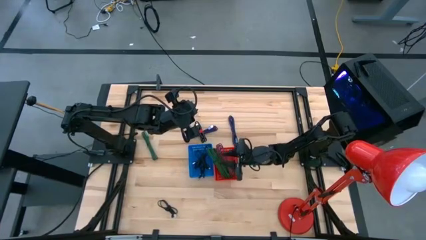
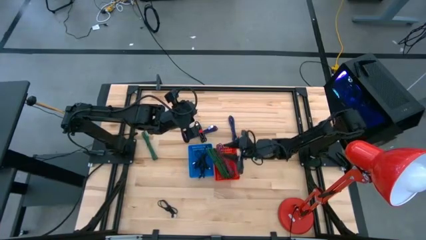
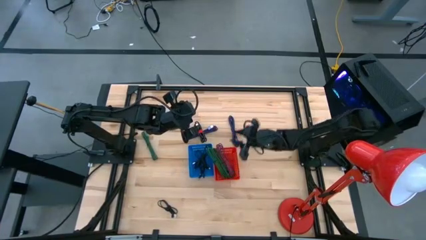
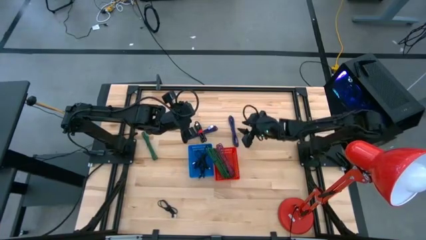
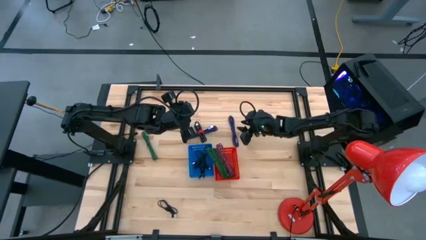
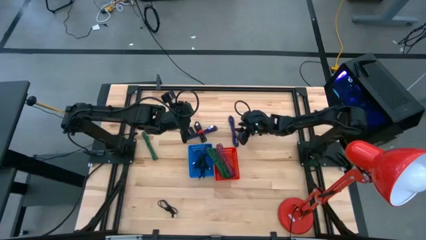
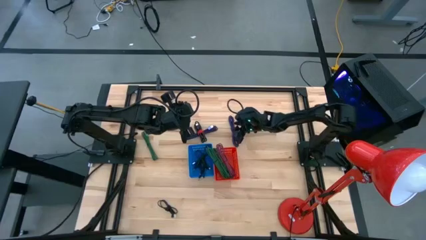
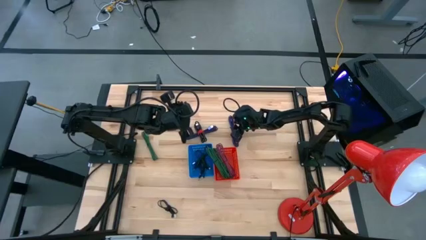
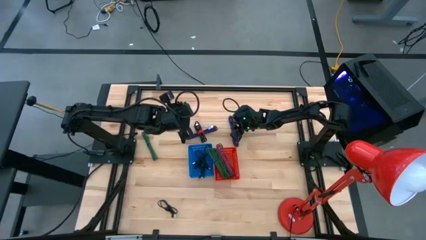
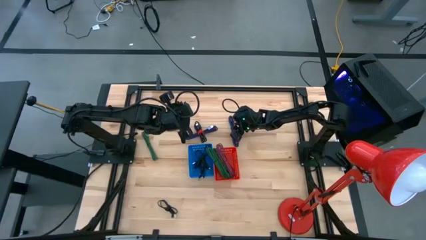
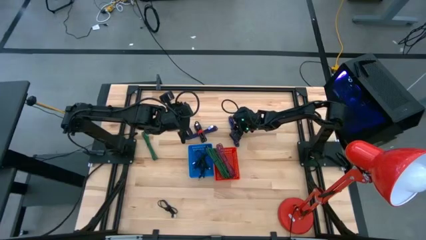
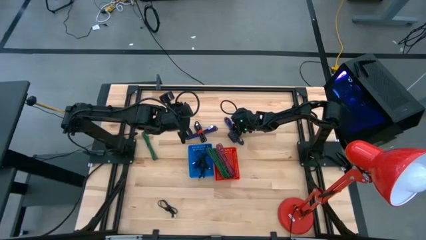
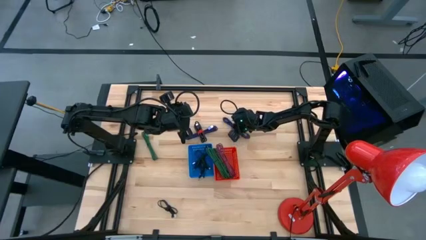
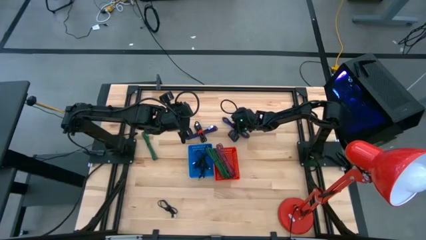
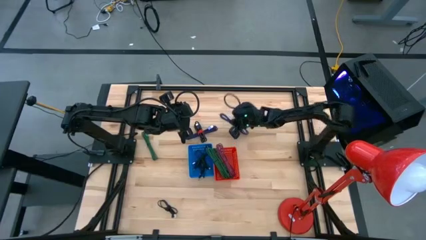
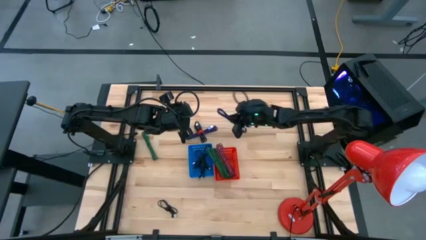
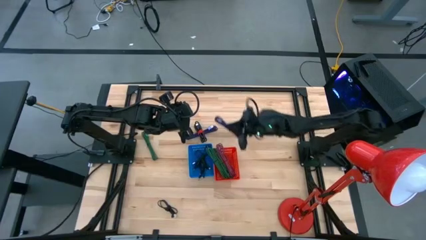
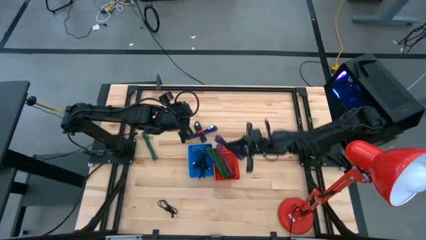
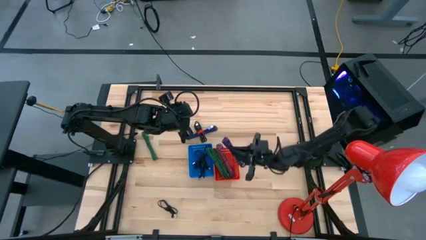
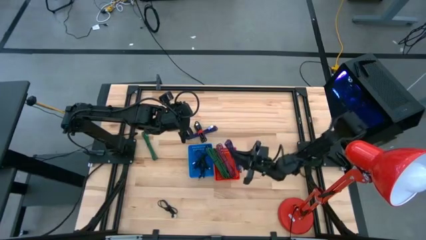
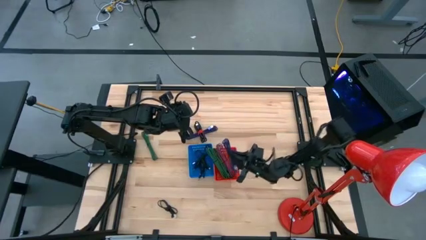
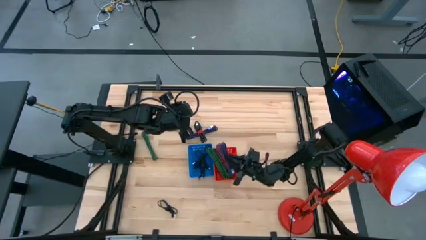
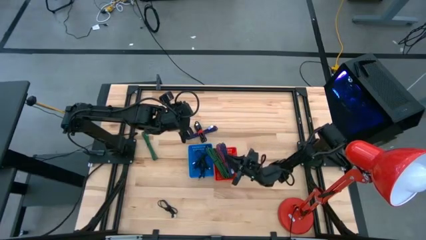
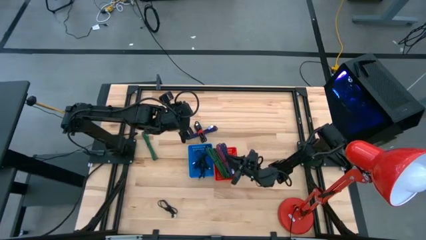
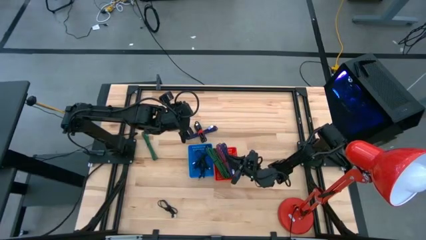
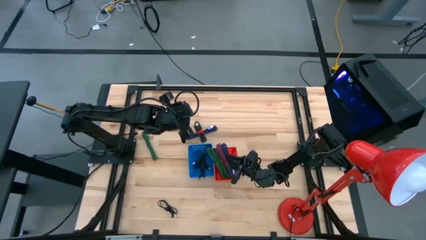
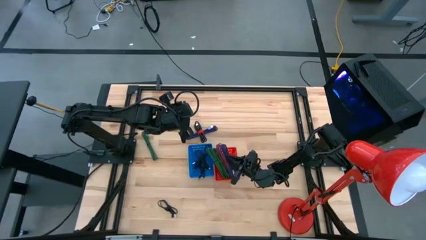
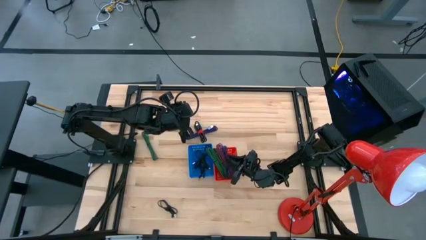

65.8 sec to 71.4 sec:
Task: Pick & Place USB Port
Put the black and blue USB cable into the red basket

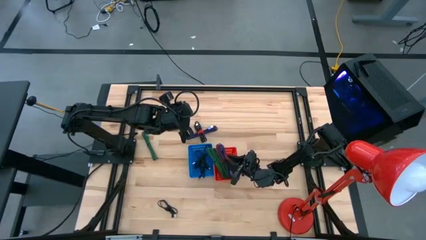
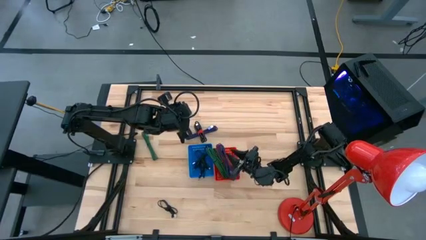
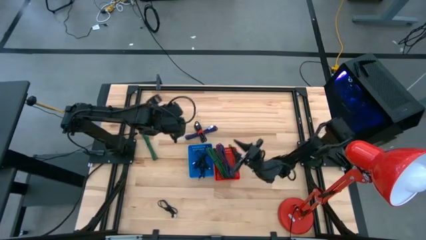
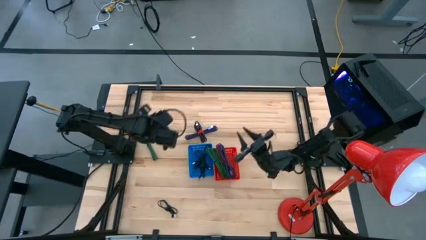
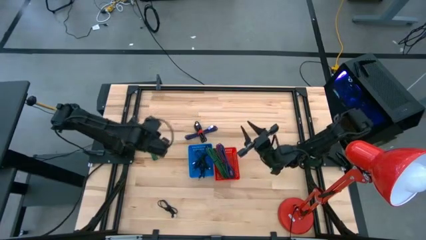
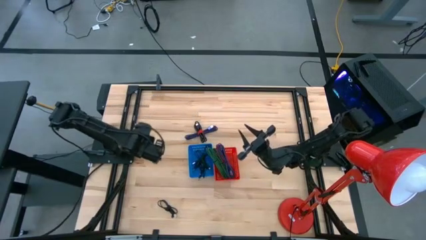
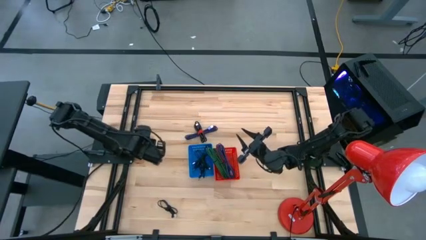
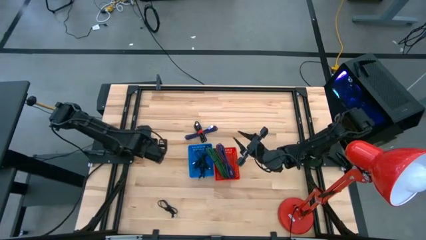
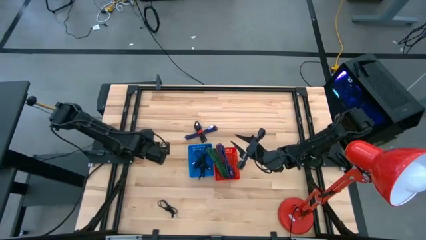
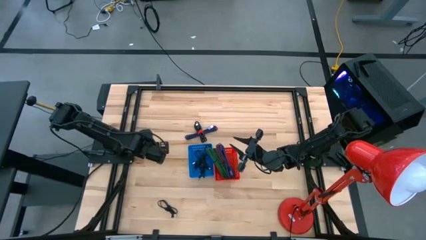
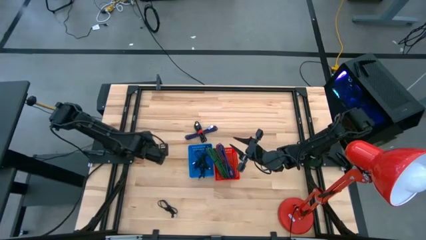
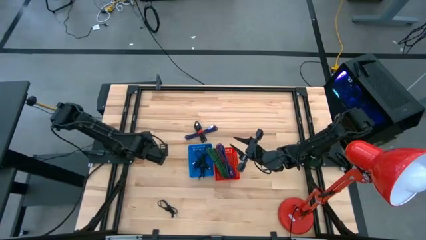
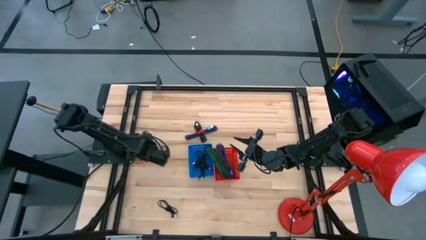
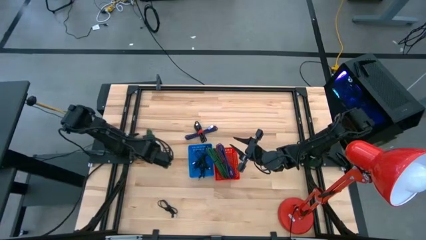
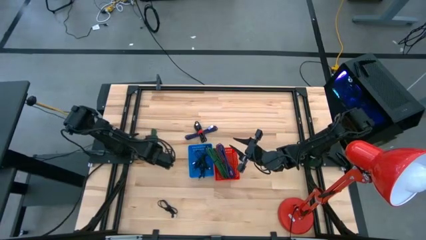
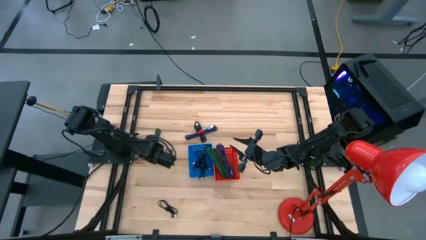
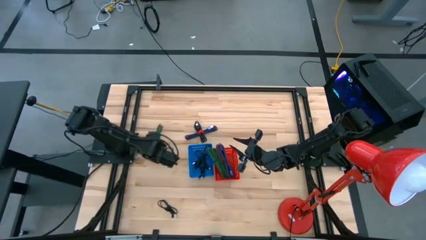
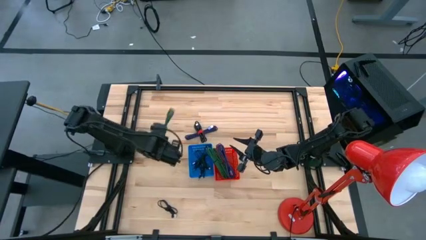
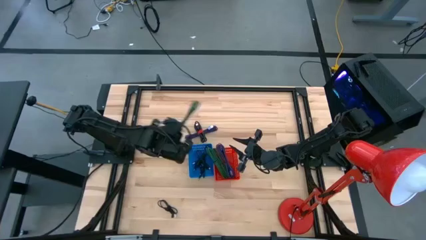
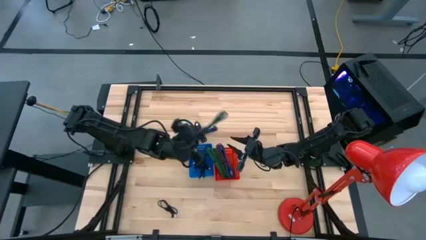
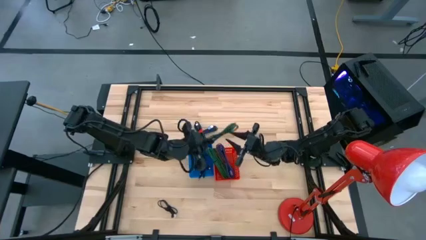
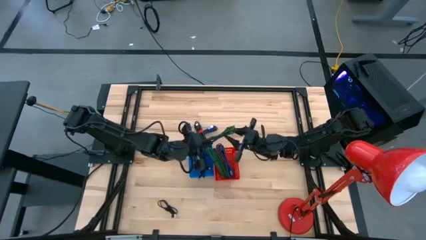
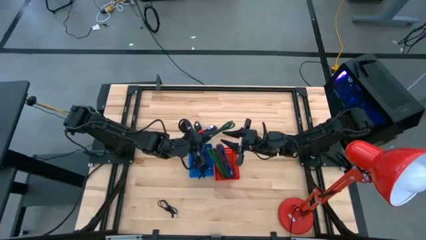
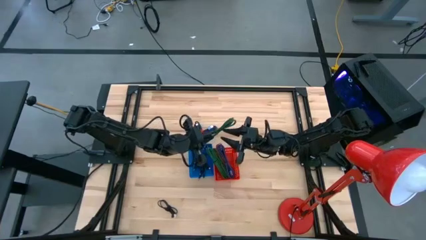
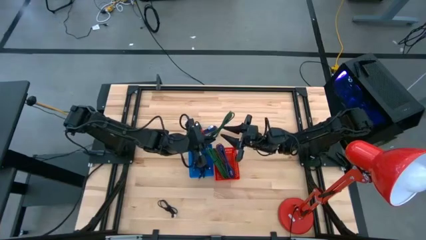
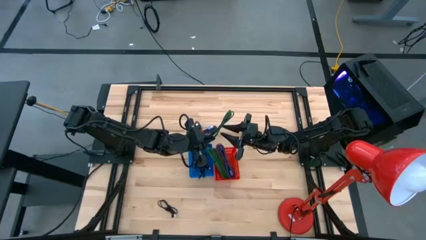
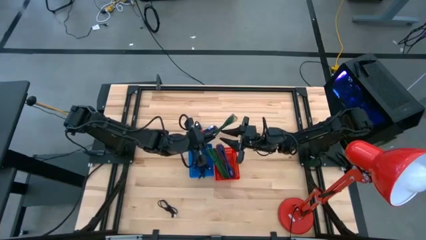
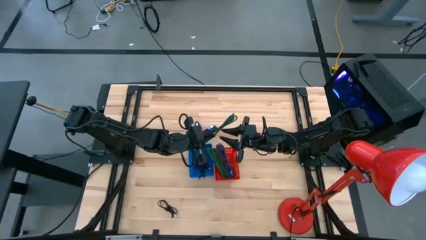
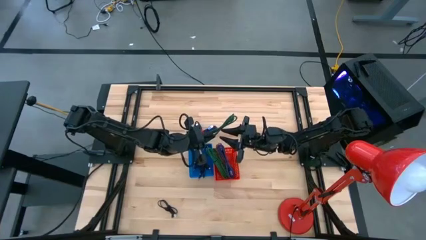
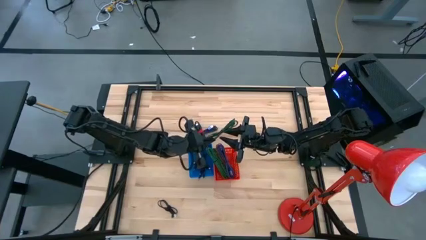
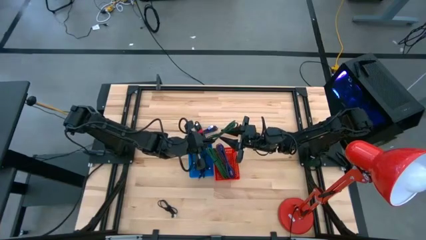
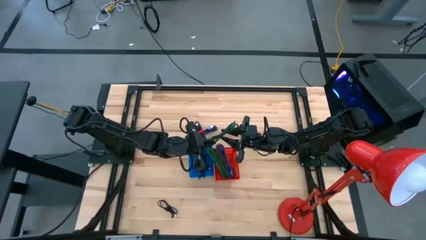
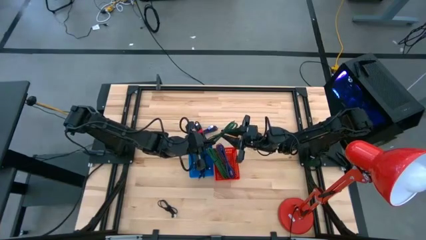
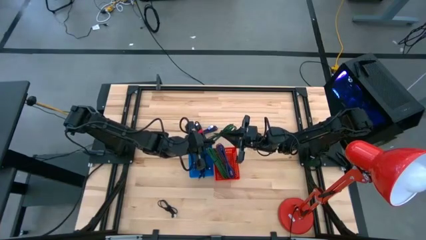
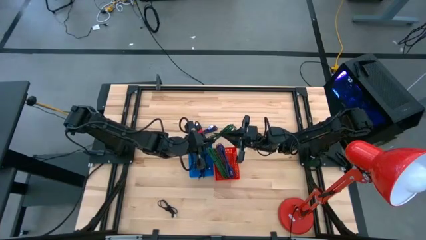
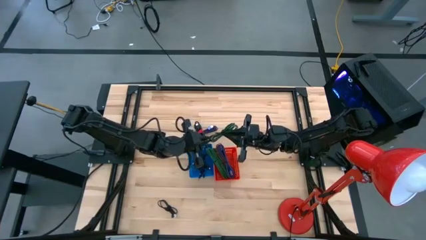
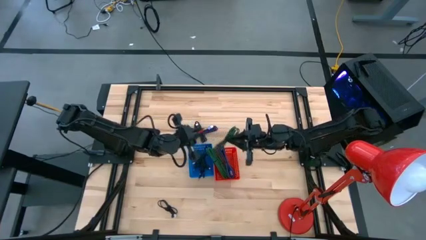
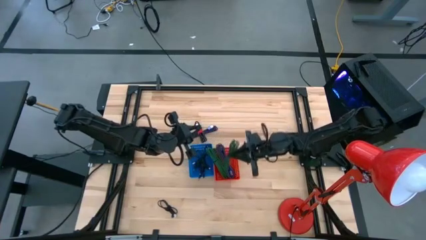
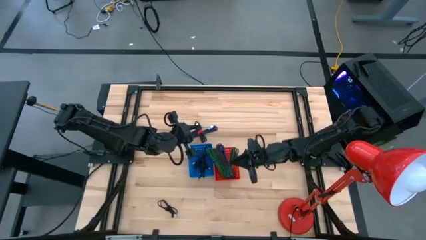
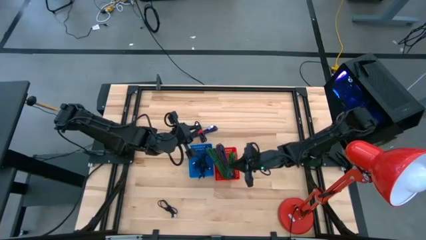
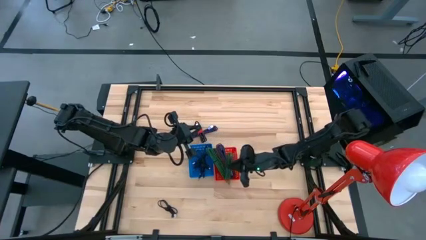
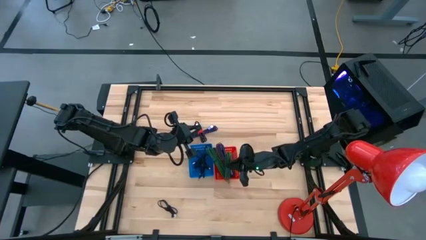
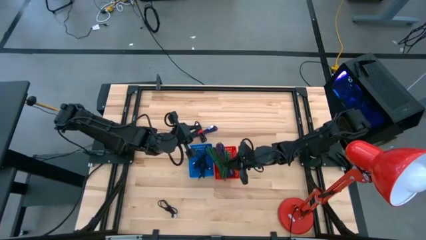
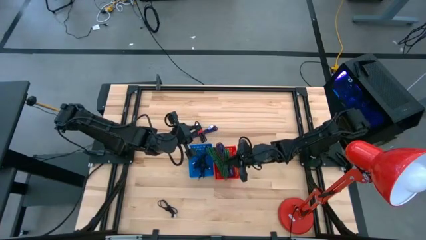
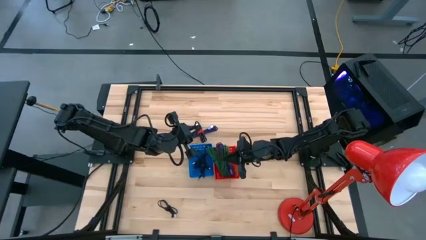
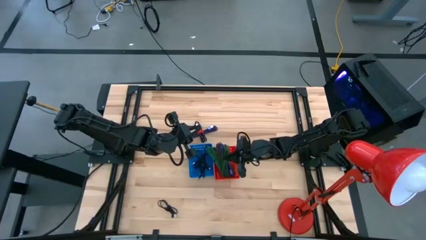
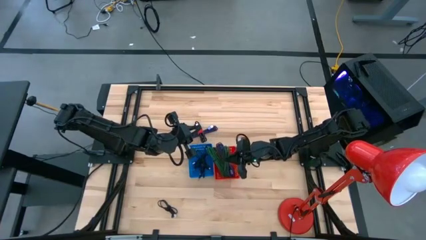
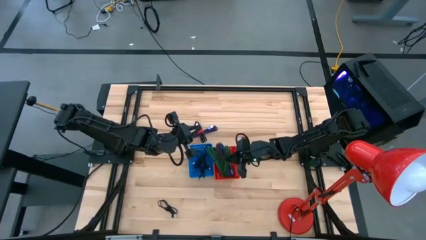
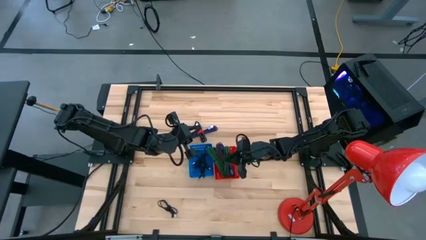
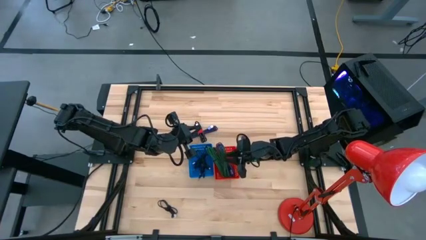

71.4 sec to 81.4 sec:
Put the black and green USB cable into the red basket
